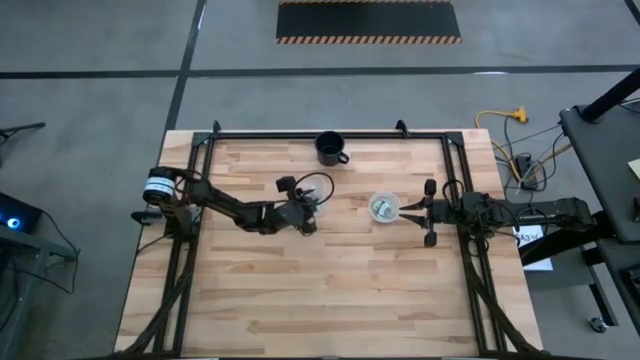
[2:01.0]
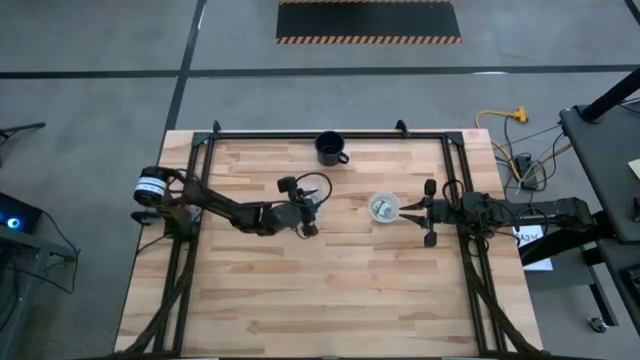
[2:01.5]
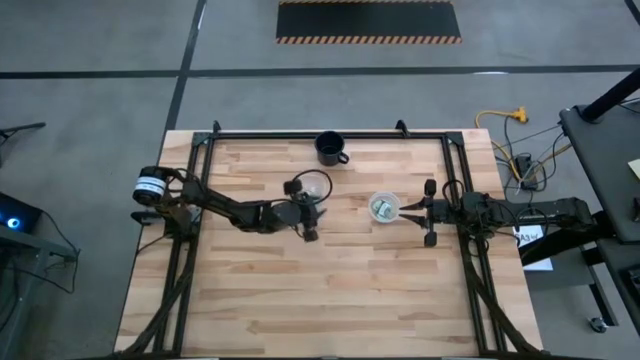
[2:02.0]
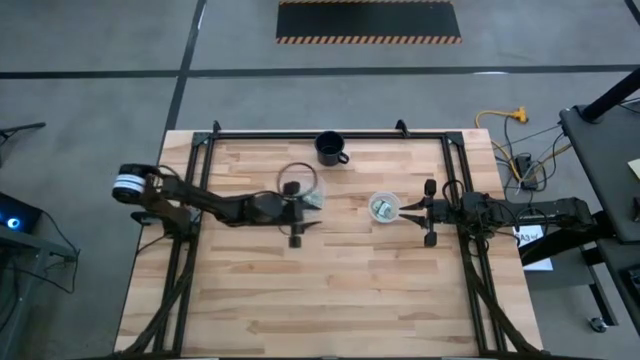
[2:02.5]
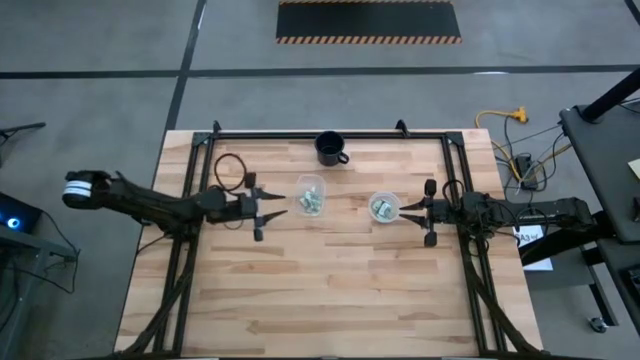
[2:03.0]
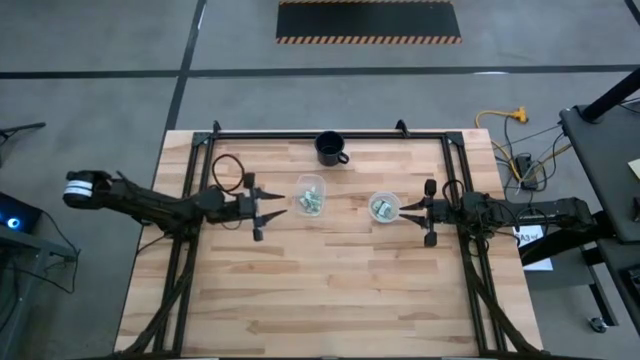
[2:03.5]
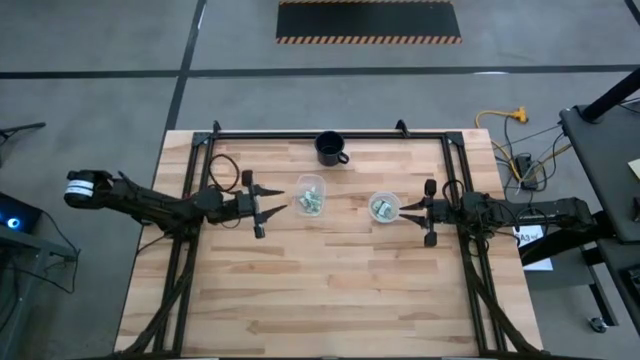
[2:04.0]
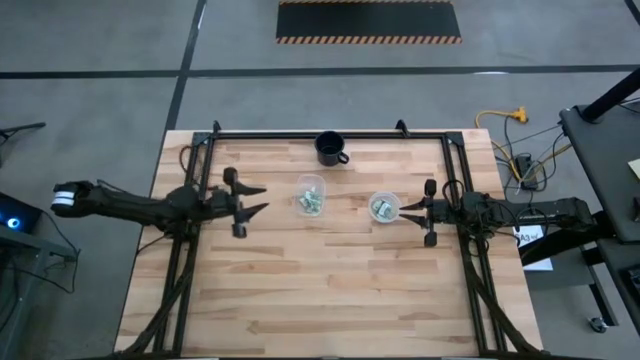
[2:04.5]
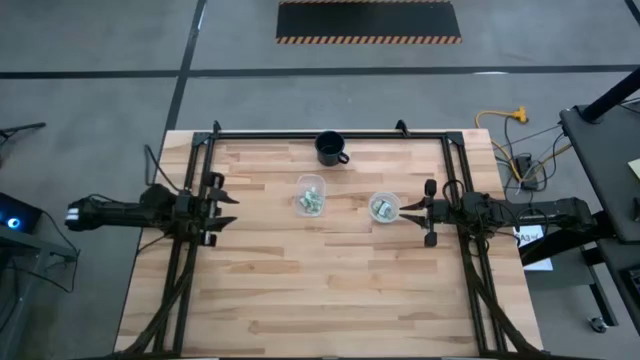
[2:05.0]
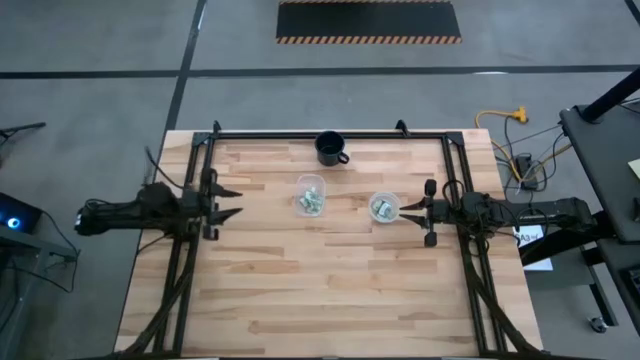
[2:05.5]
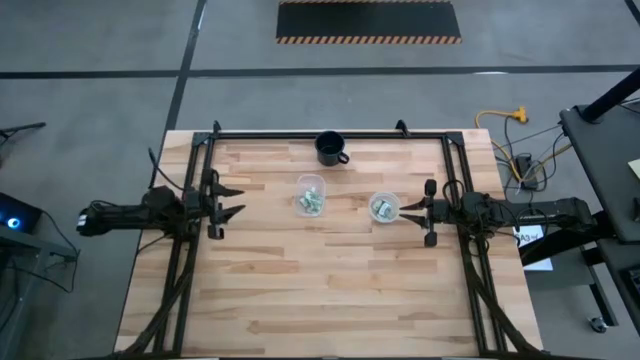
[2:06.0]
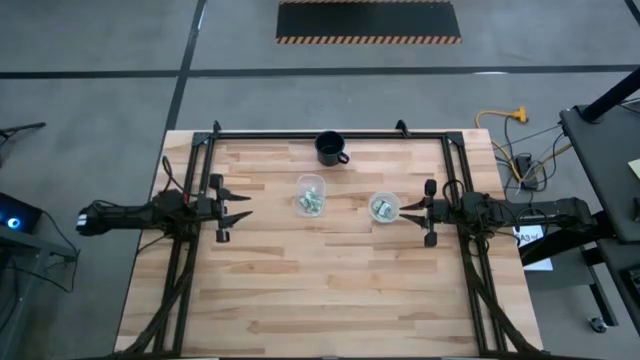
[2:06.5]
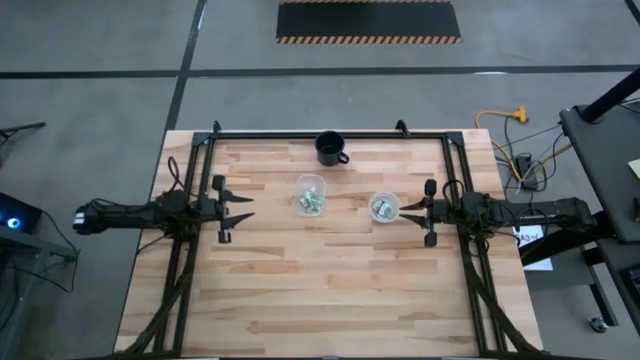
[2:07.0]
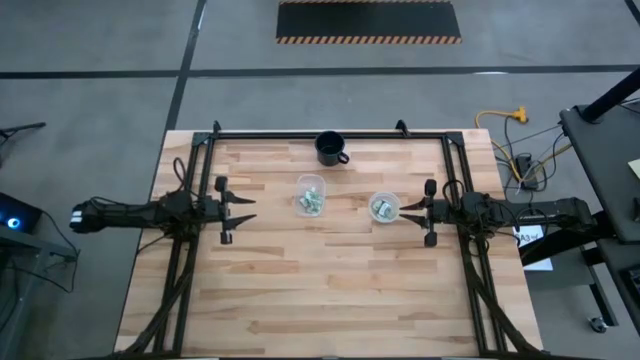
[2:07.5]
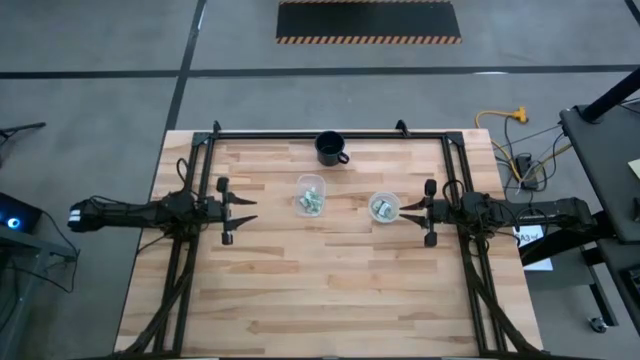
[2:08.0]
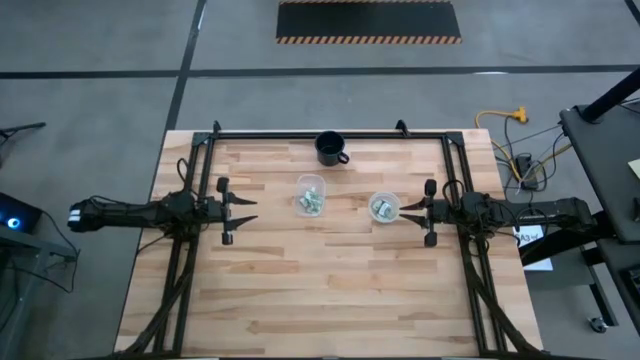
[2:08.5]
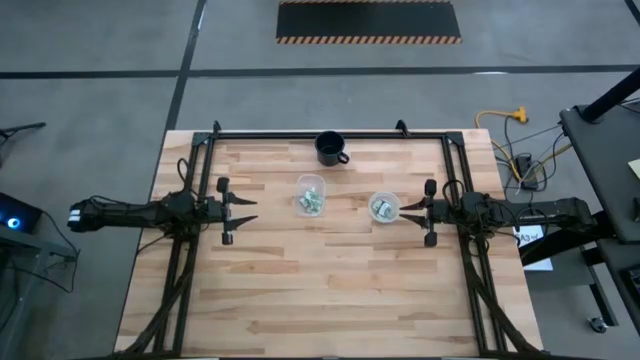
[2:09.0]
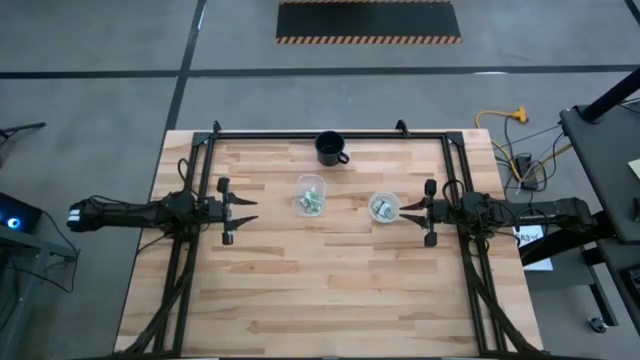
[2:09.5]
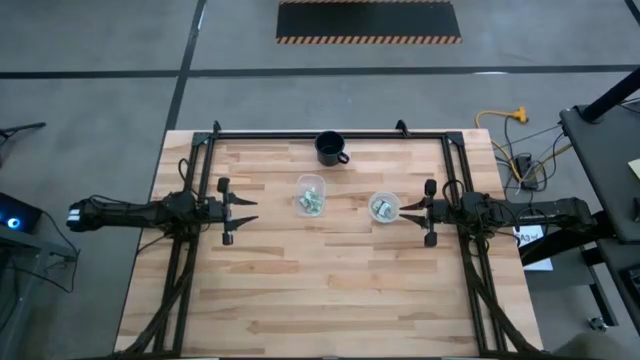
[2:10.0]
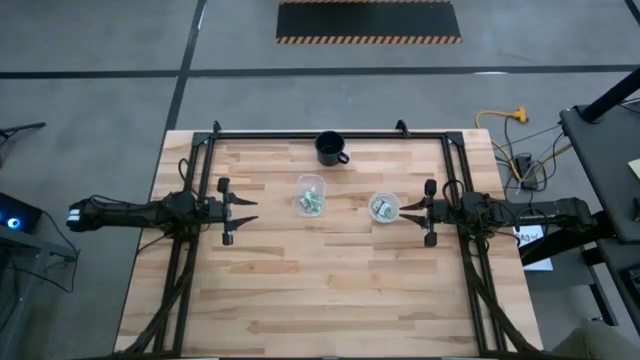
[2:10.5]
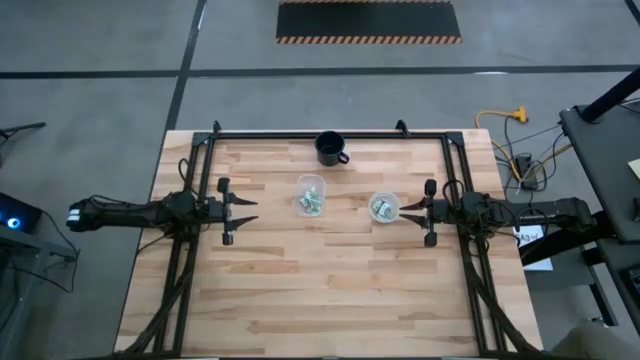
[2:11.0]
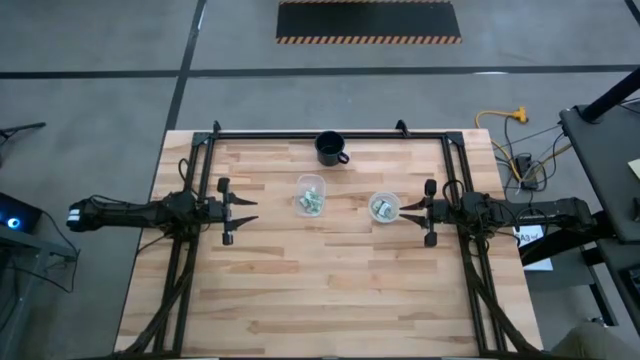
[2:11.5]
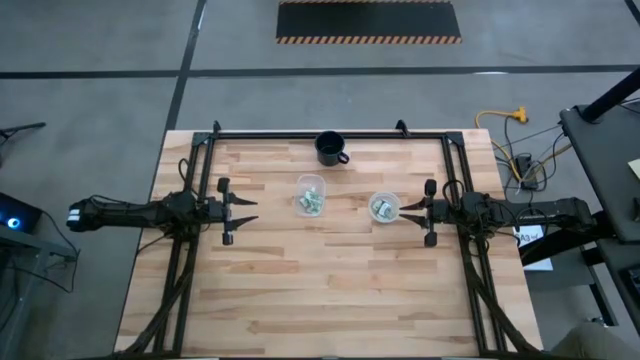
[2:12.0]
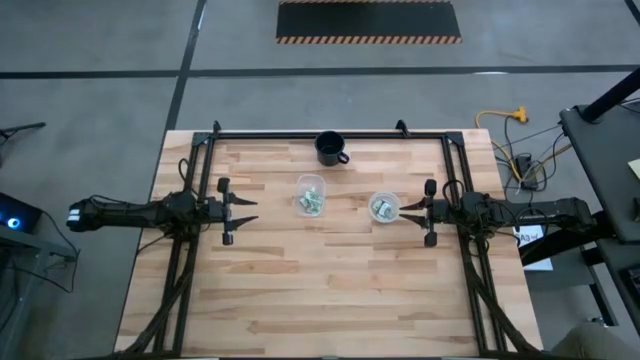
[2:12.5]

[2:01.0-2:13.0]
Task: Pick and place items into bin
Return to Home Position

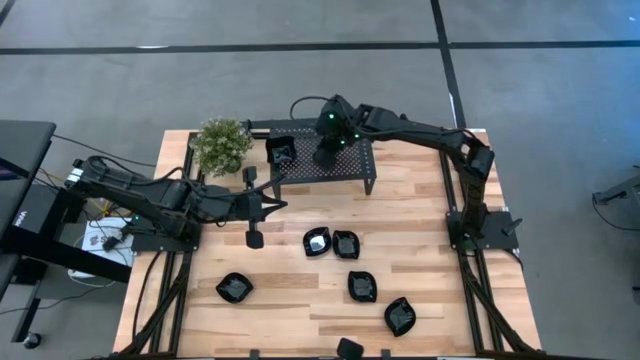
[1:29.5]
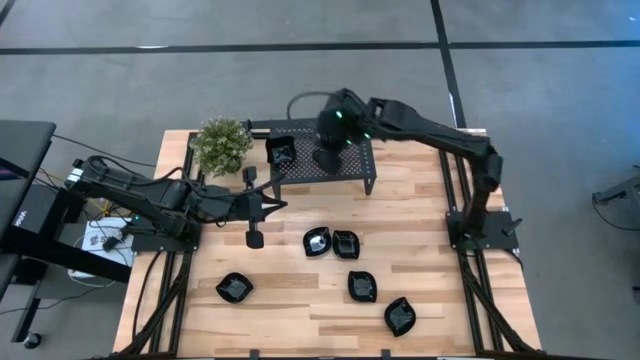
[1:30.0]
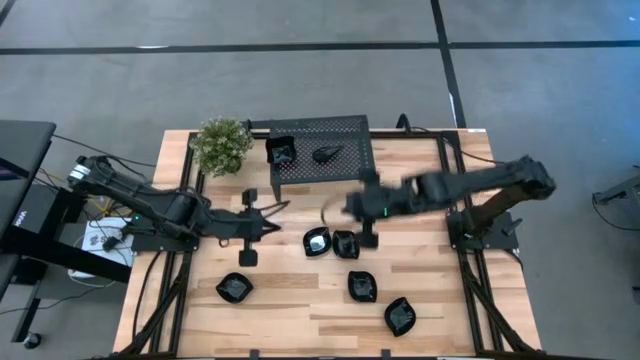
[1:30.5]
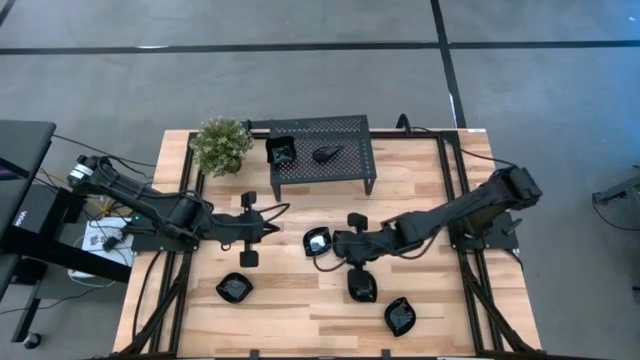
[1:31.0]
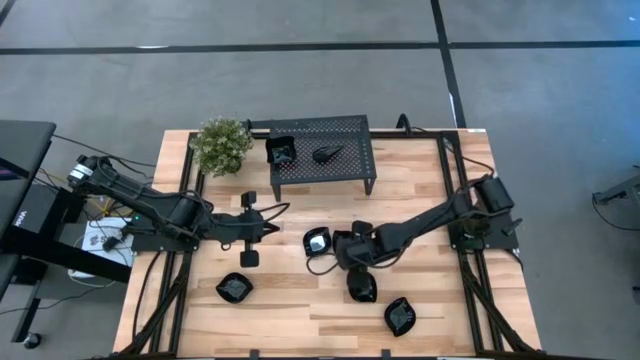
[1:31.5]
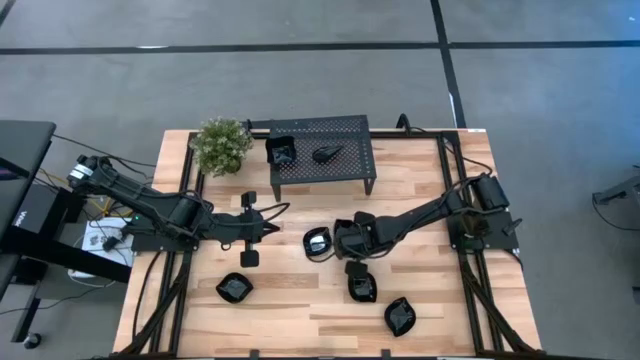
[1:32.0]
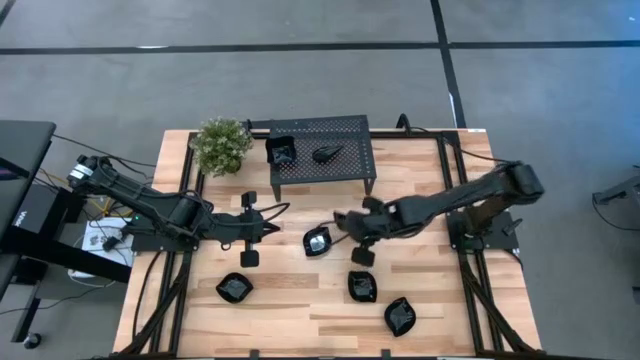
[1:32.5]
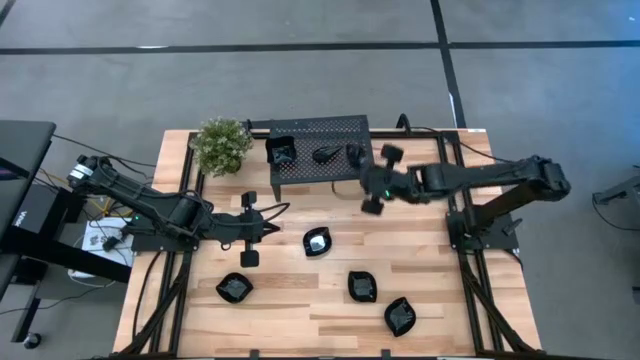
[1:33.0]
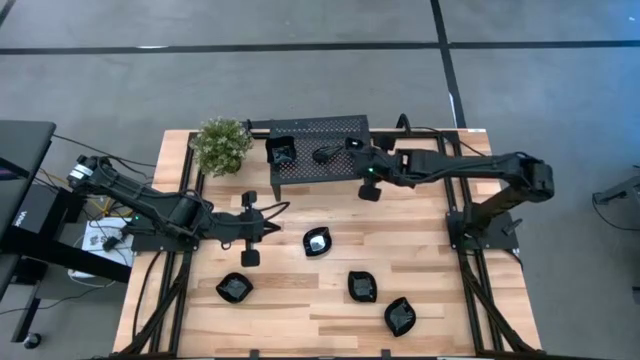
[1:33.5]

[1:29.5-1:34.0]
Task: Pick & Place Mini shaped plates
Put the leaf shaped plate on the shelf

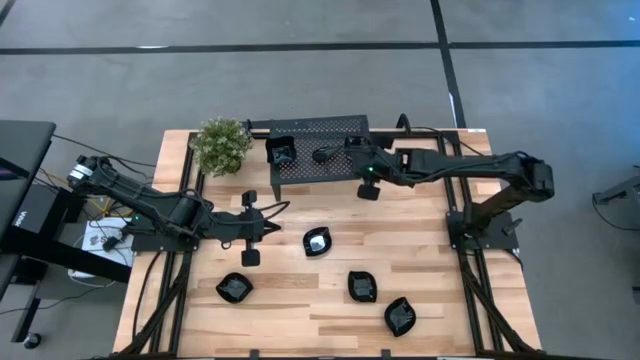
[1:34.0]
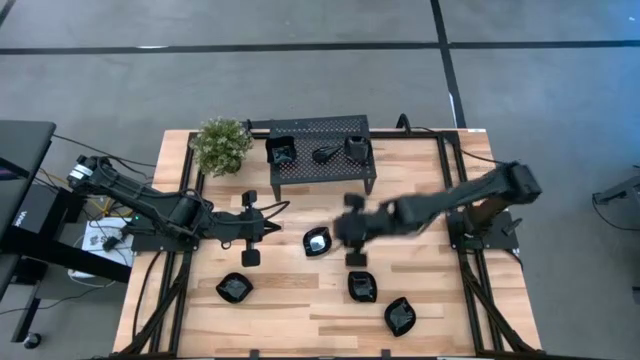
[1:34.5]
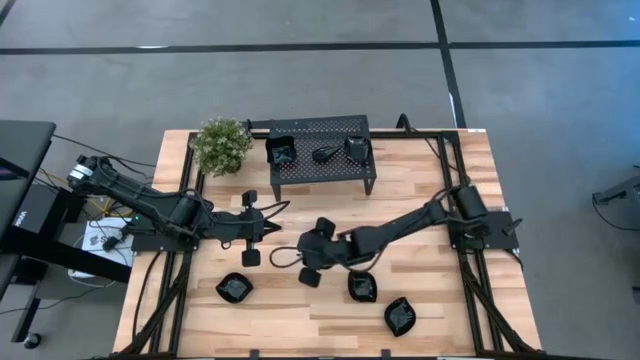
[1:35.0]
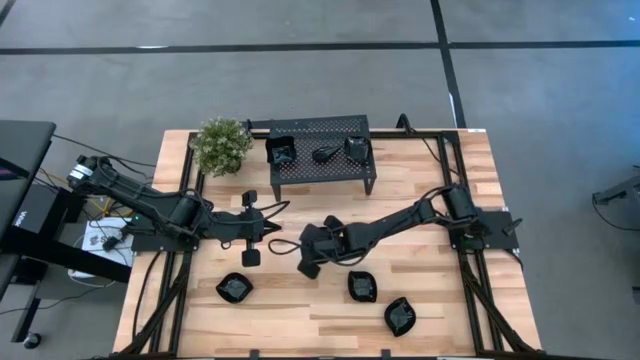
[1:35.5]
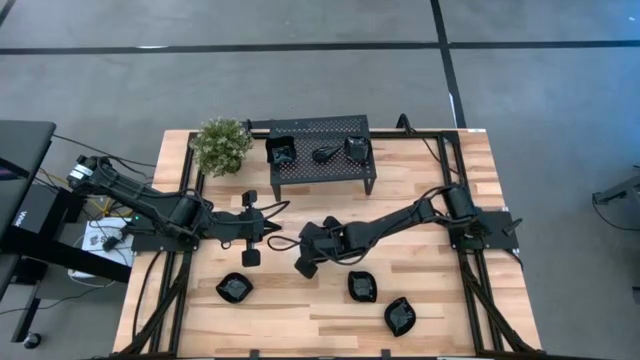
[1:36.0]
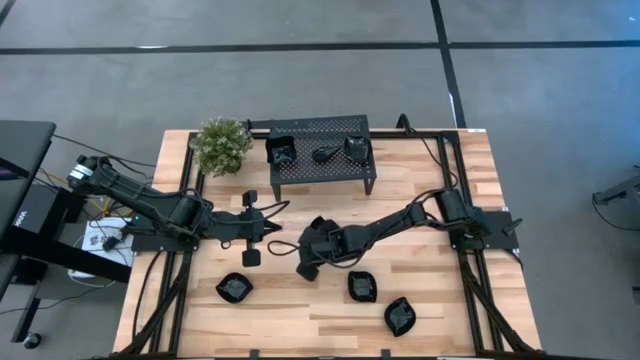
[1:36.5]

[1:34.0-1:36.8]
Stack the leaf shaped plate on top of the leaf shaped plate on the shelf

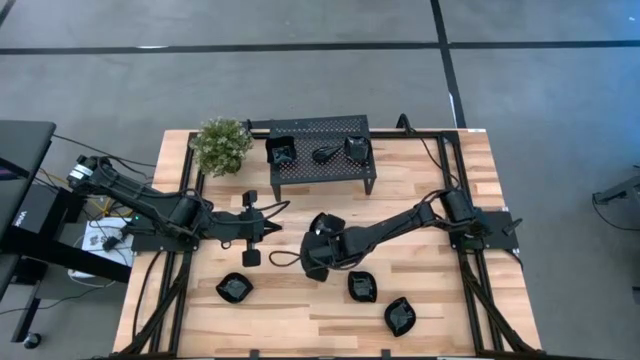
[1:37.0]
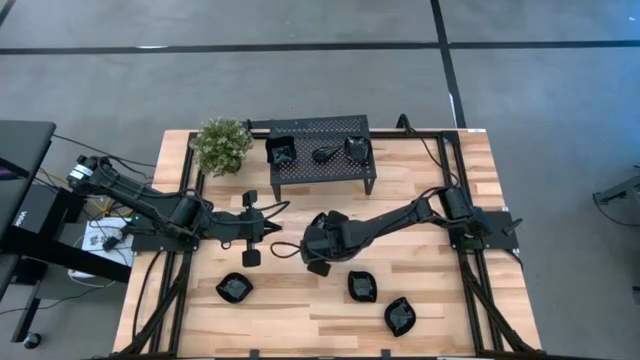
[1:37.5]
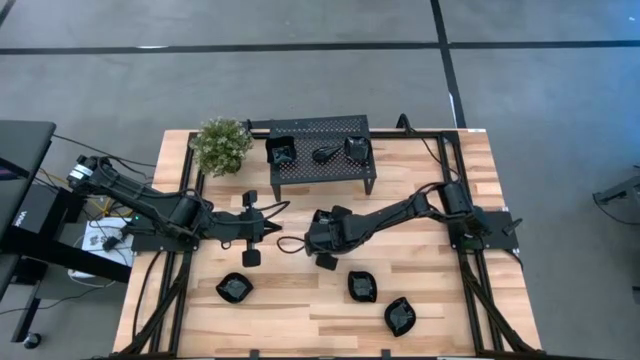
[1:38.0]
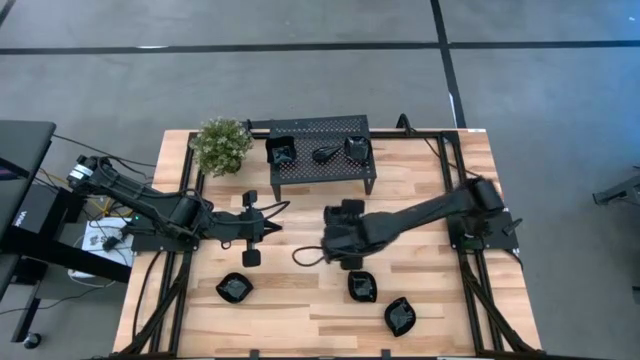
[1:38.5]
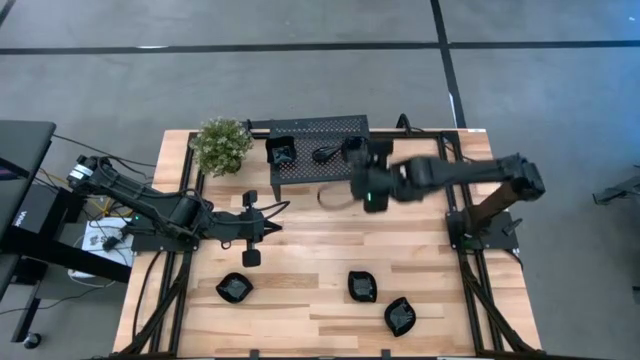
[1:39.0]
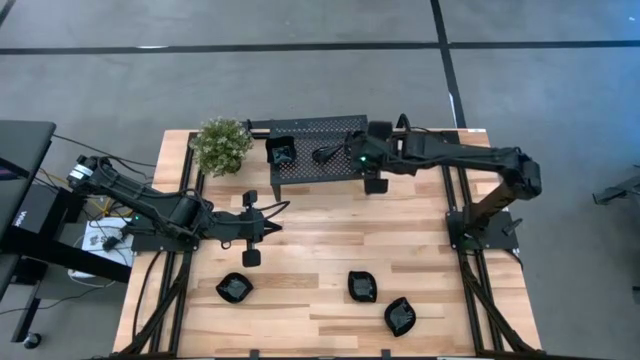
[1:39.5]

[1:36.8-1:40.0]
Stack the leaf shaped plate on top of the leaf shaped plate on the shelf
